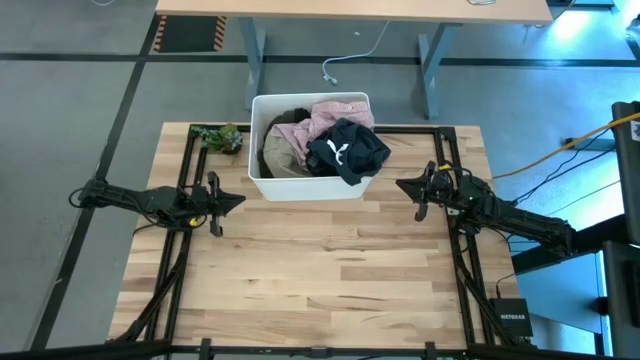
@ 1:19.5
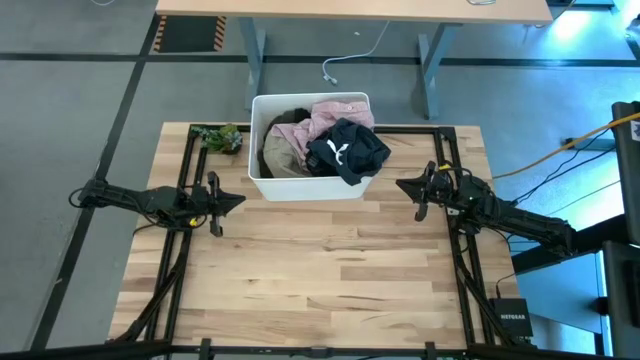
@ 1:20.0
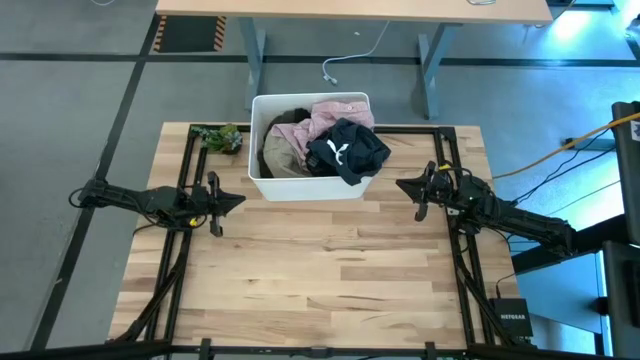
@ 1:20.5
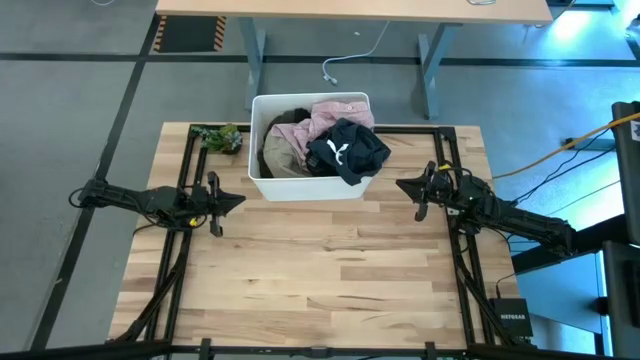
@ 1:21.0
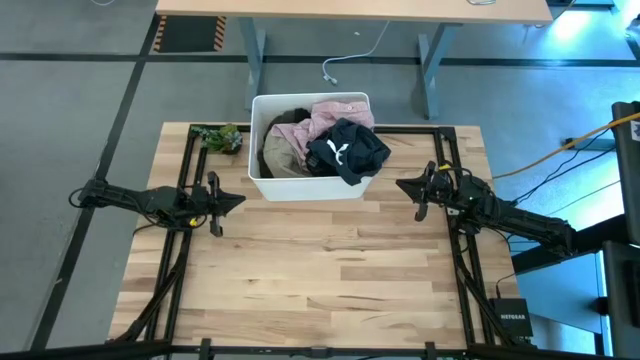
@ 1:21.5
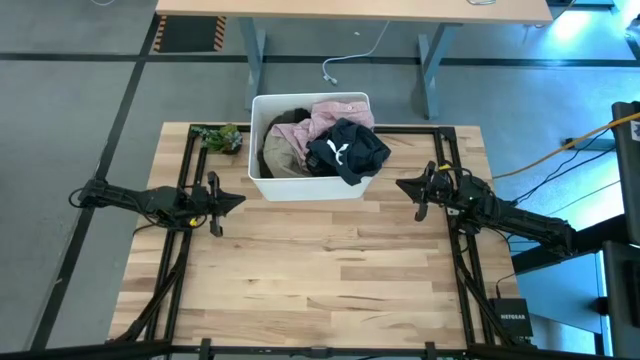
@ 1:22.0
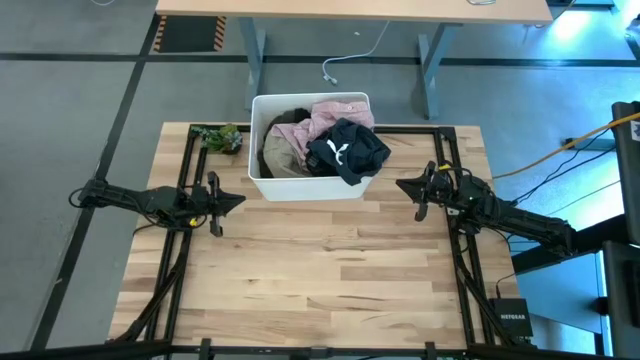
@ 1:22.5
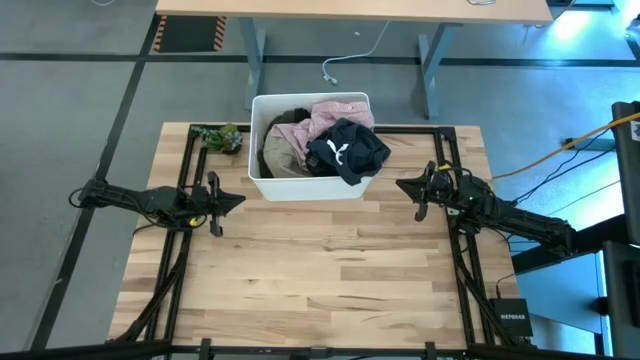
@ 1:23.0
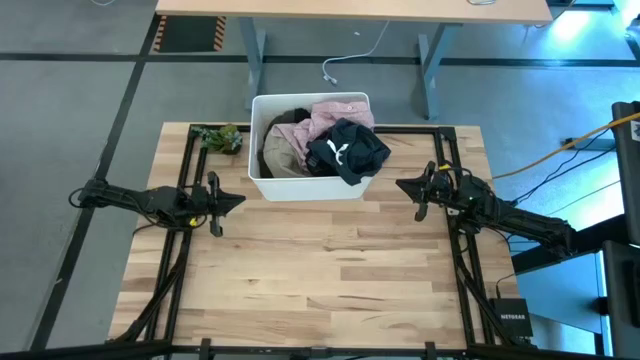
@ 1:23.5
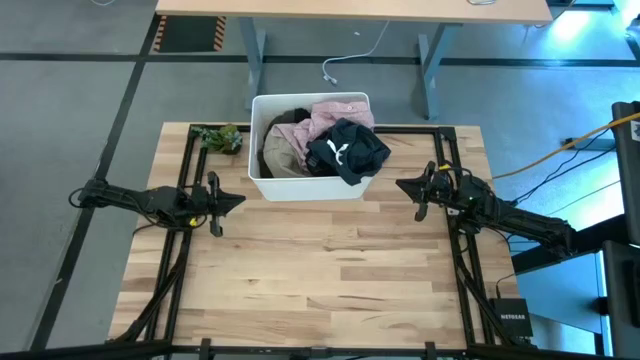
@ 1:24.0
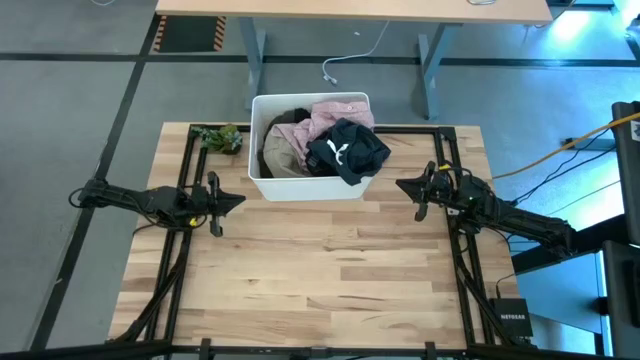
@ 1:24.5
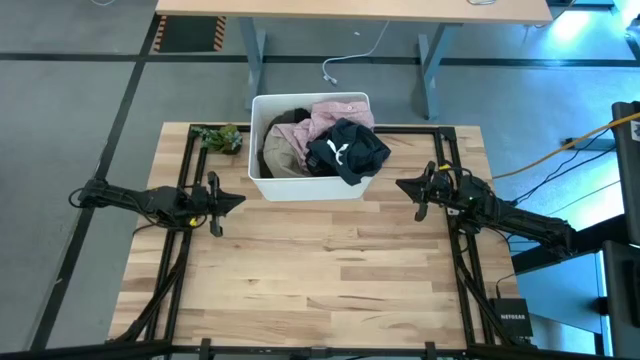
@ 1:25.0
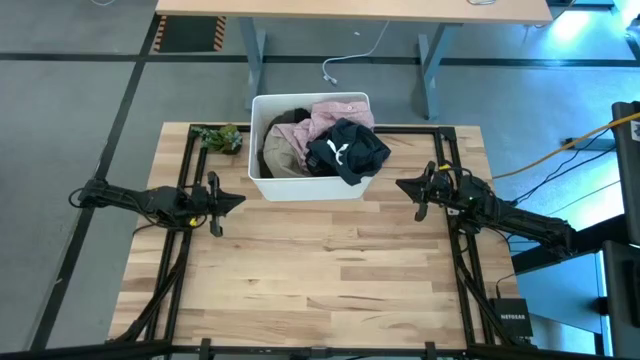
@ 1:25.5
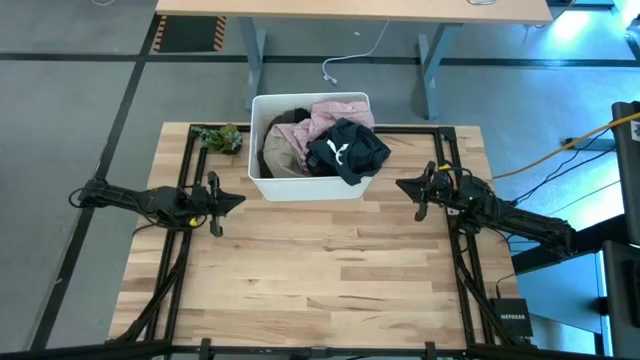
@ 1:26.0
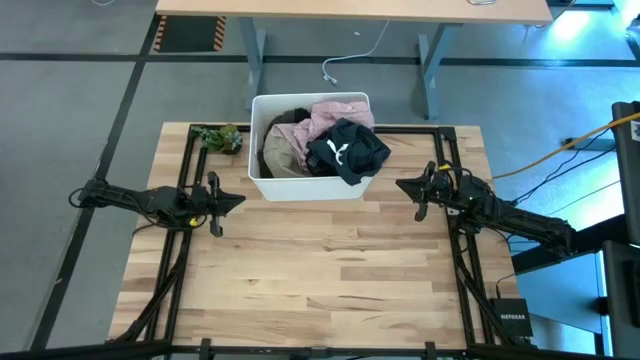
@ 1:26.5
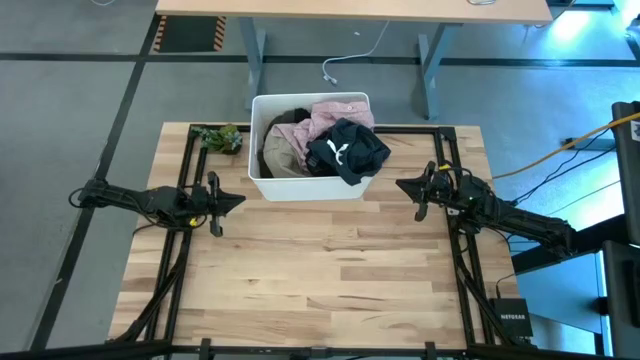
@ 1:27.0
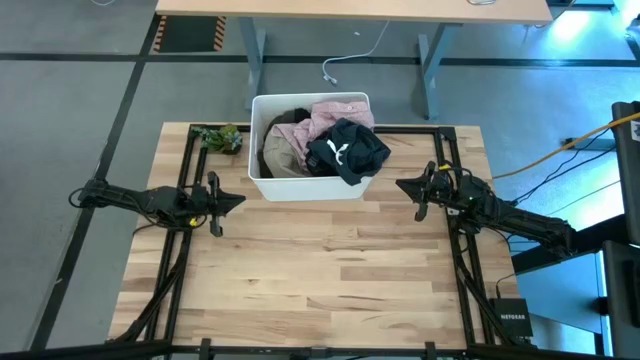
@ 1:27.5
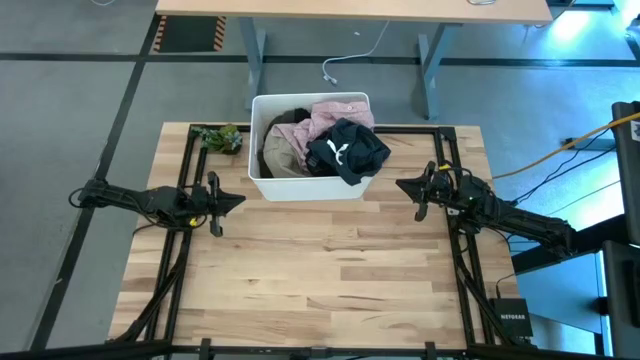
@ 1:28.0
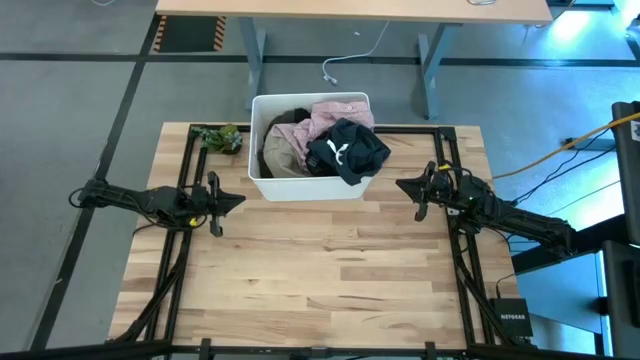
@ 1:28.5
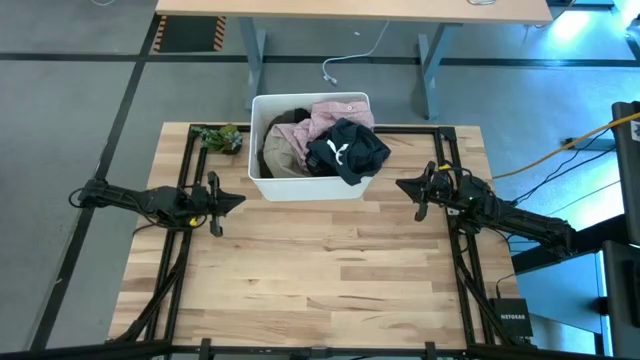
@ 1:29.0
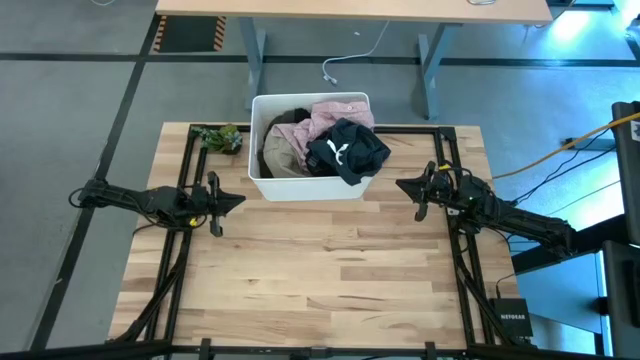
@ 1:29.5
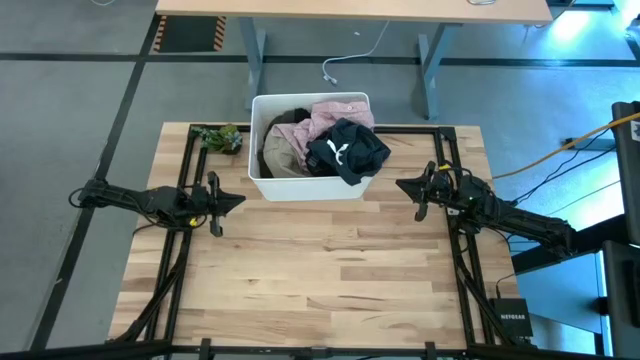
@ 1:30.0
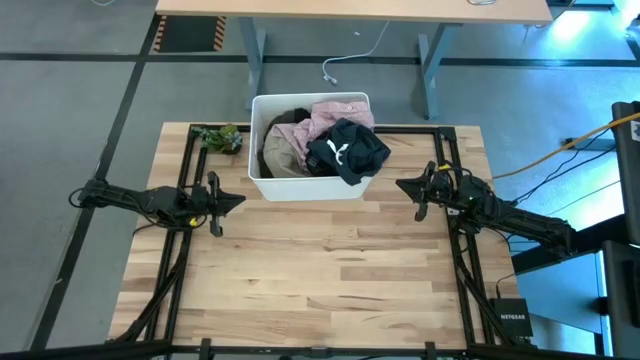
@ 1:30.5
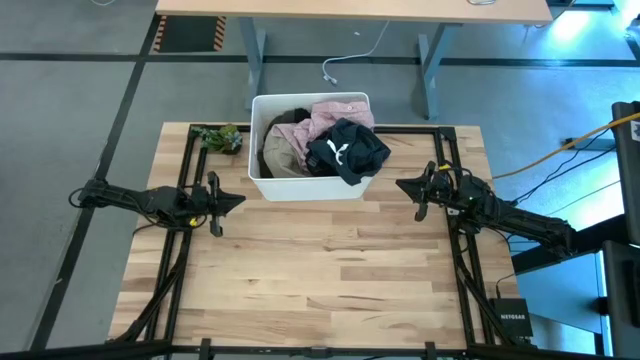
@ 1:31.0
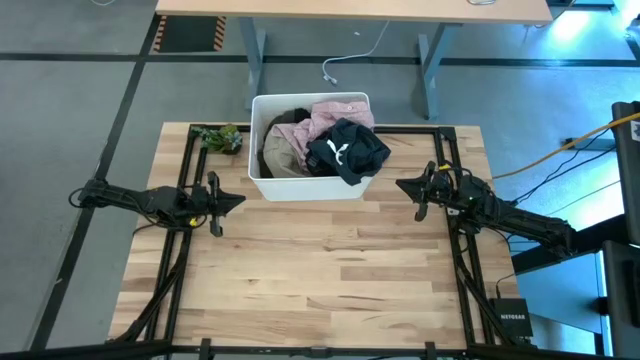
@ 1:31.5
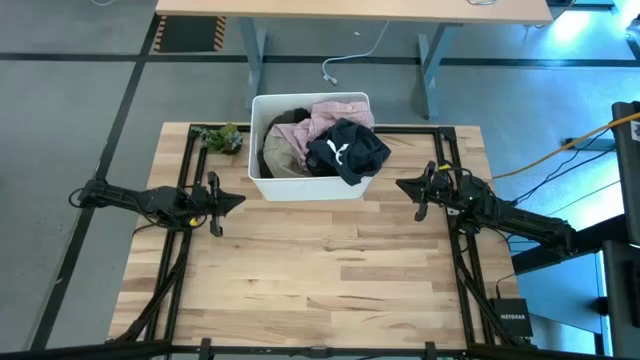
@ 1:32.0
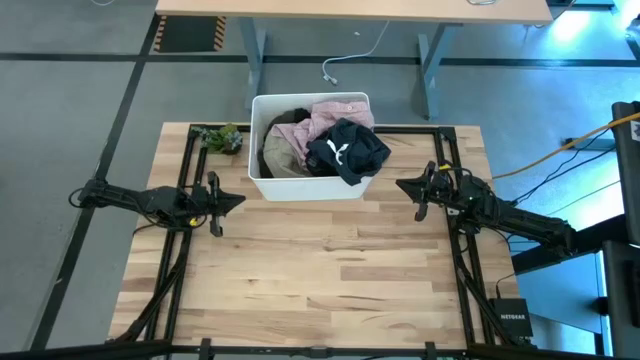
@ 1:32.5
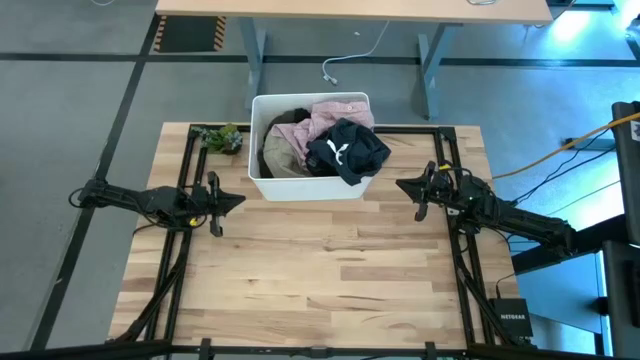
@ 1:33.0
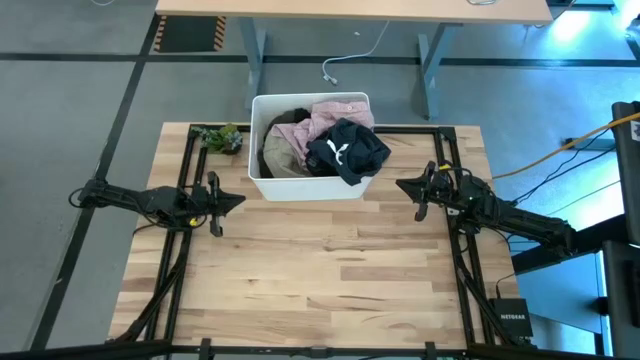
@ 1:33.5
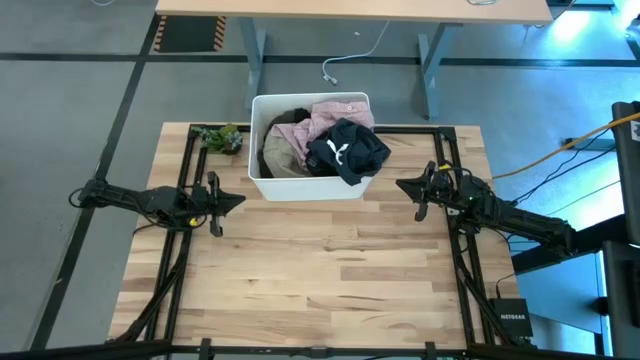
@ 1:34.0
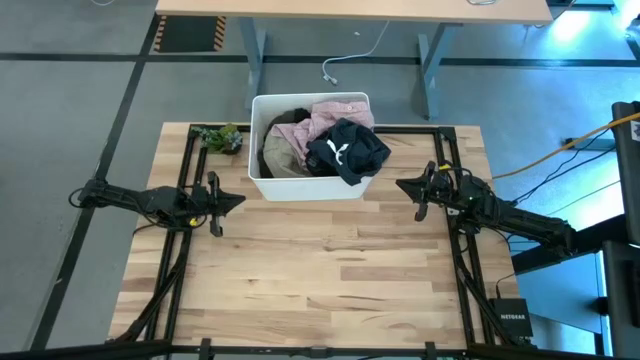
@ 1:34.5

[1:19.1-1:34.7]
Task: Sort clothes
Return to Home Position

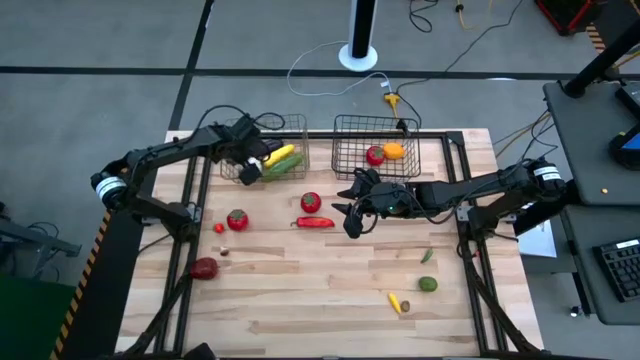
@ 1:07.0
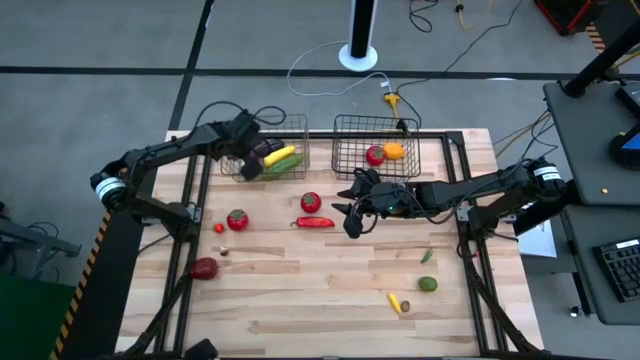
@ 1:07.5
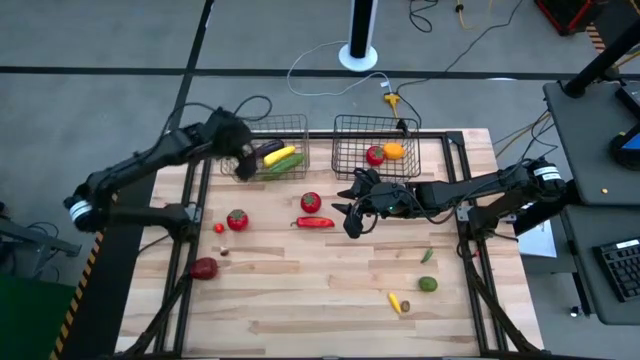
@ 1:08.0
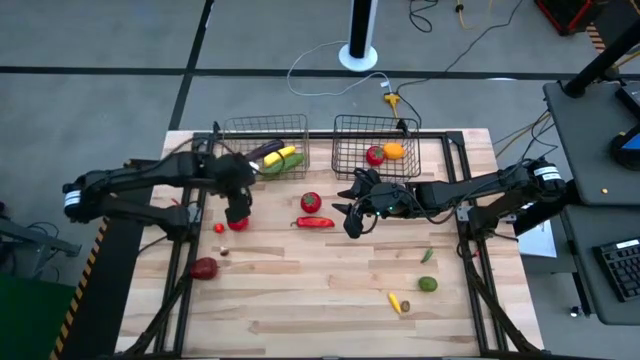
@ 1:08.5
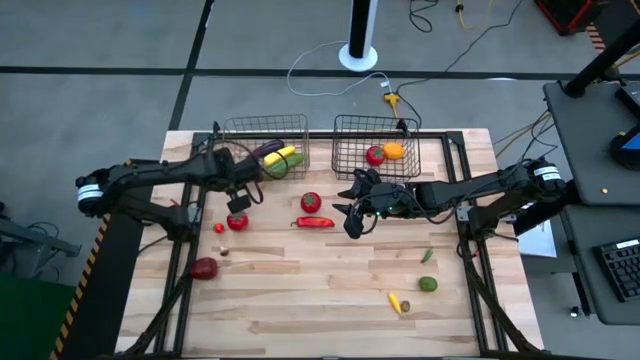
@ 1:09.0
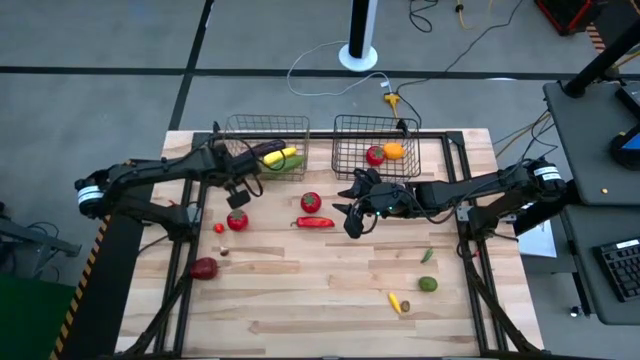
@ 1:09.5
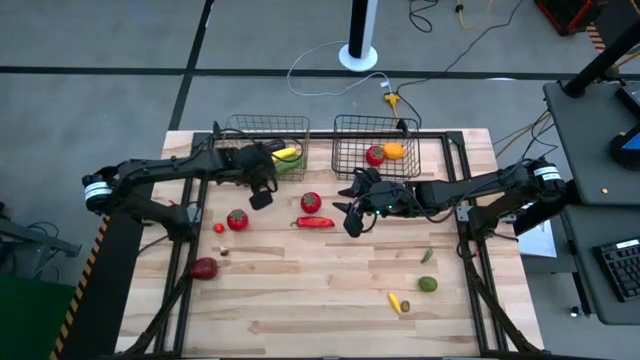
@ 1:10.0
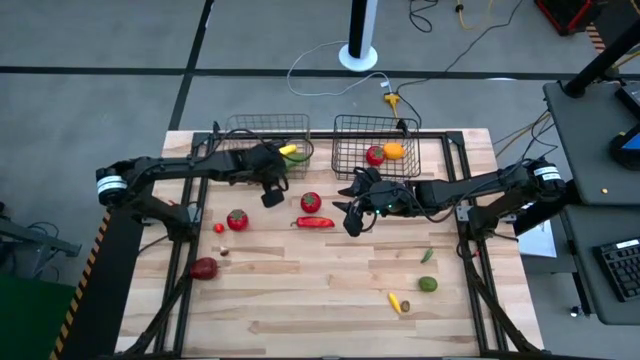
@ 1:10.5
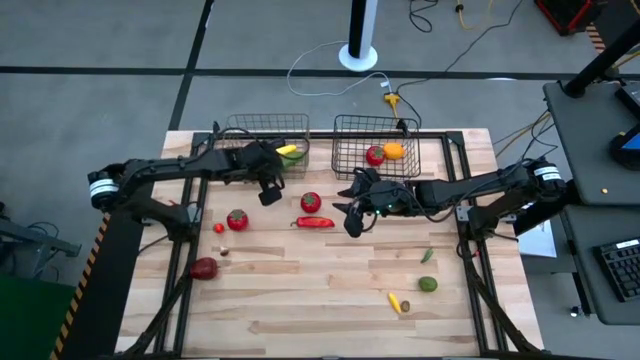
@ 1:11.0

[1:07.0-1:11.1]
Task: Sort produce into baskets
Adjust the left wire basket
